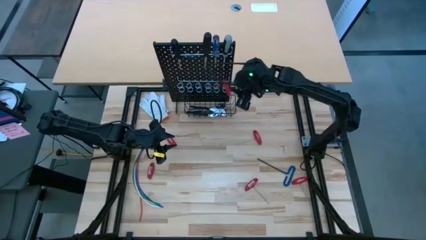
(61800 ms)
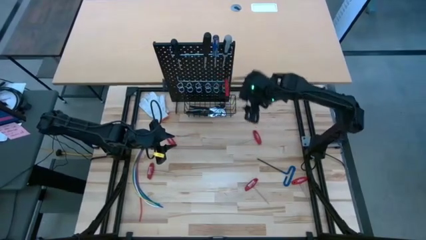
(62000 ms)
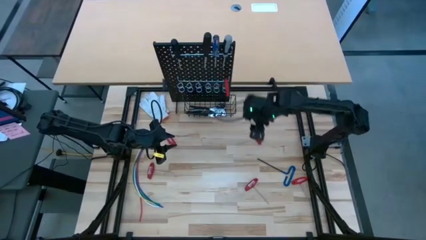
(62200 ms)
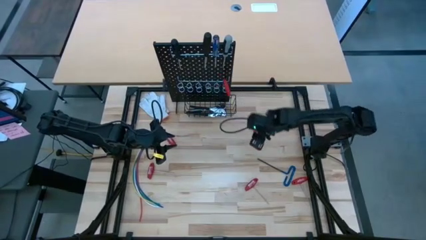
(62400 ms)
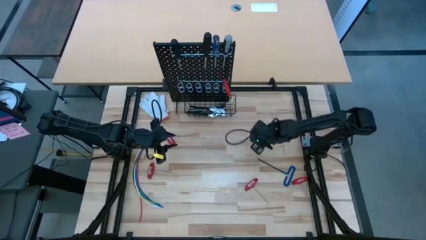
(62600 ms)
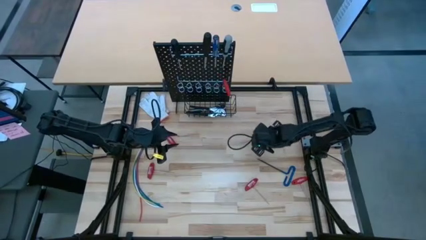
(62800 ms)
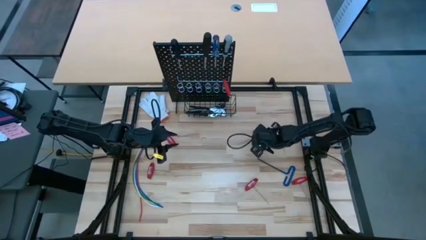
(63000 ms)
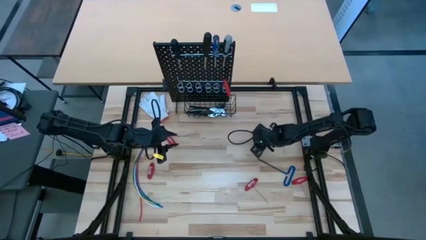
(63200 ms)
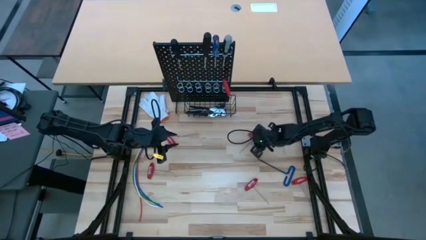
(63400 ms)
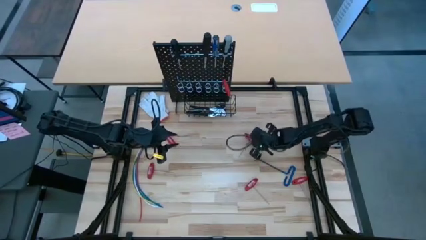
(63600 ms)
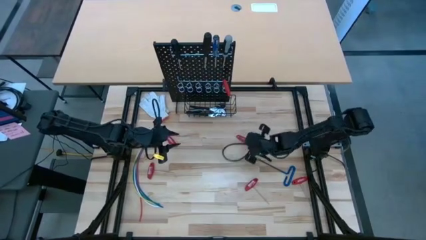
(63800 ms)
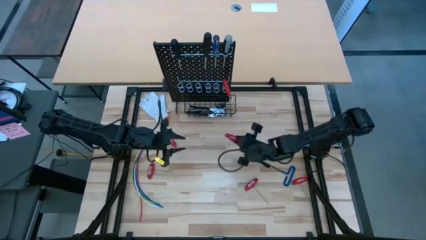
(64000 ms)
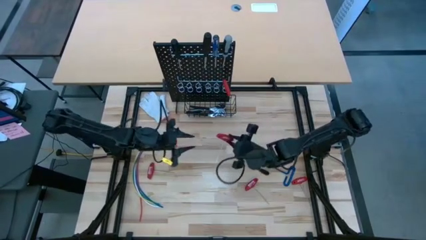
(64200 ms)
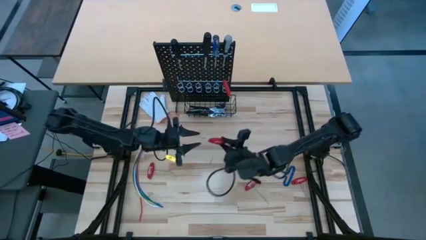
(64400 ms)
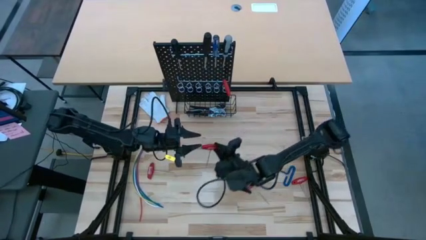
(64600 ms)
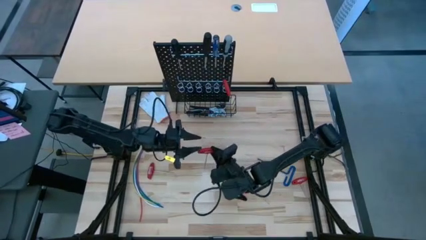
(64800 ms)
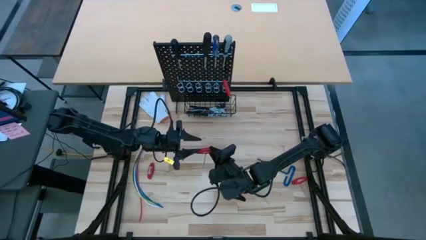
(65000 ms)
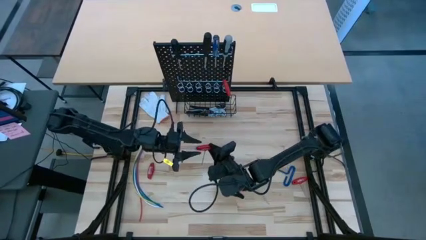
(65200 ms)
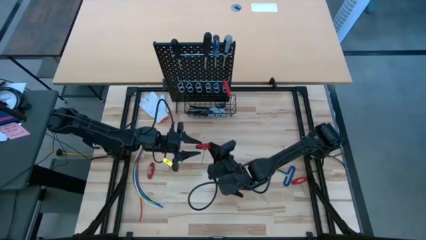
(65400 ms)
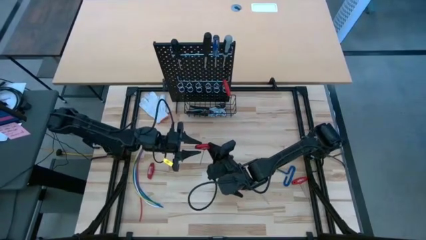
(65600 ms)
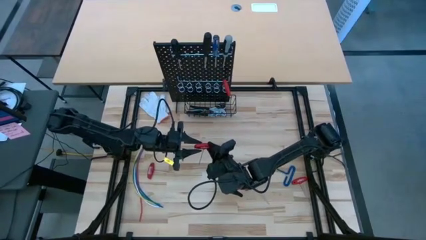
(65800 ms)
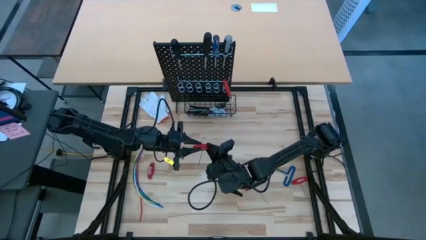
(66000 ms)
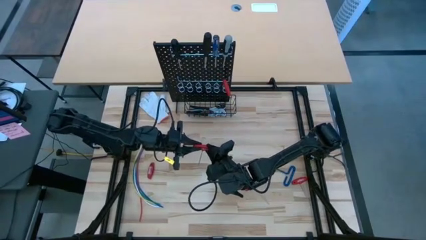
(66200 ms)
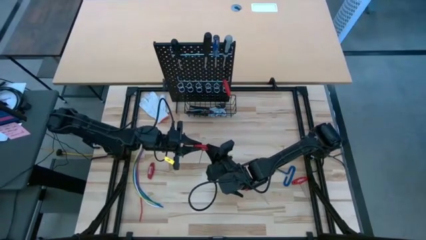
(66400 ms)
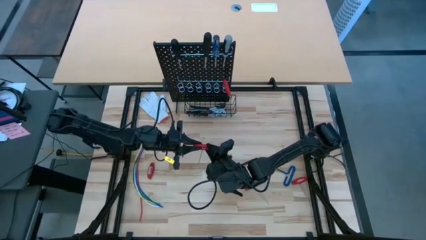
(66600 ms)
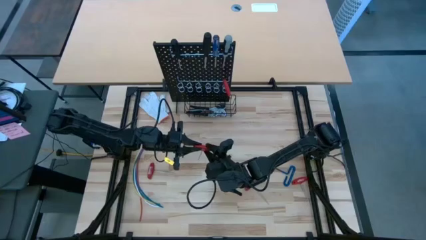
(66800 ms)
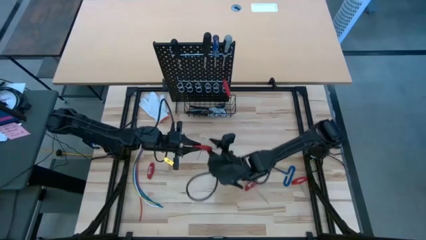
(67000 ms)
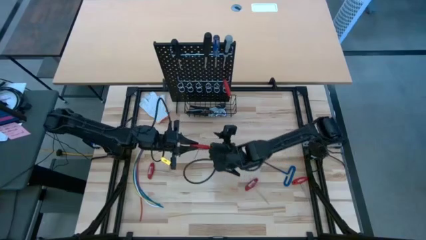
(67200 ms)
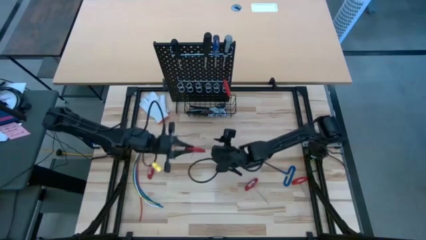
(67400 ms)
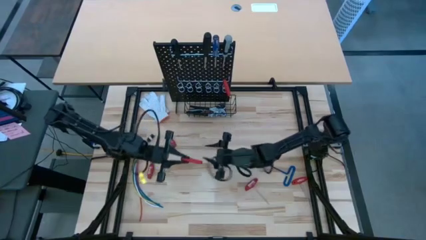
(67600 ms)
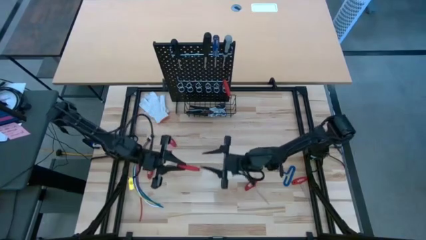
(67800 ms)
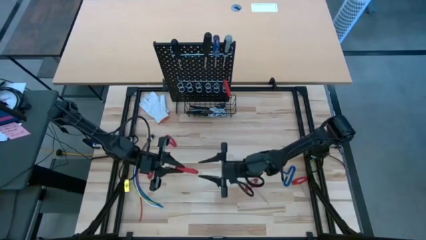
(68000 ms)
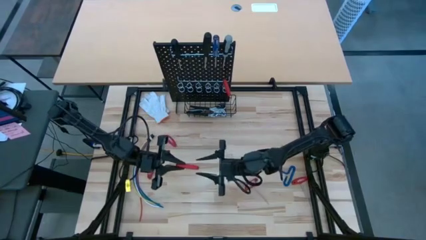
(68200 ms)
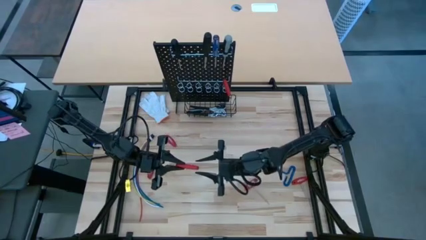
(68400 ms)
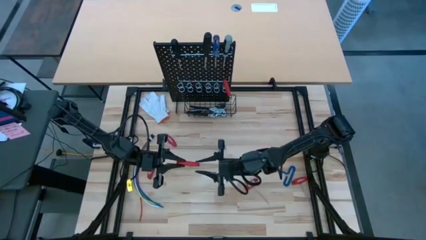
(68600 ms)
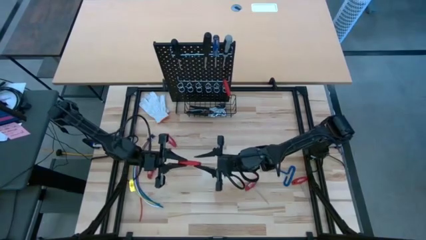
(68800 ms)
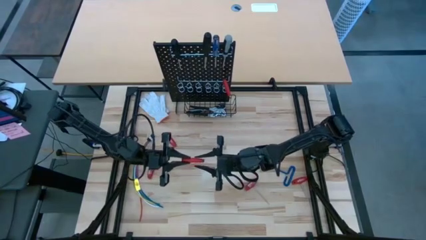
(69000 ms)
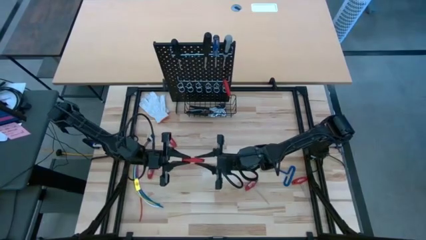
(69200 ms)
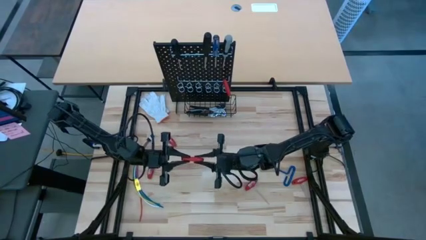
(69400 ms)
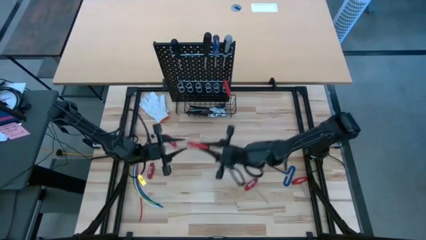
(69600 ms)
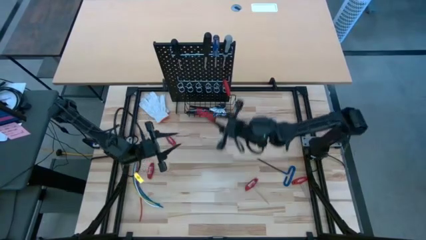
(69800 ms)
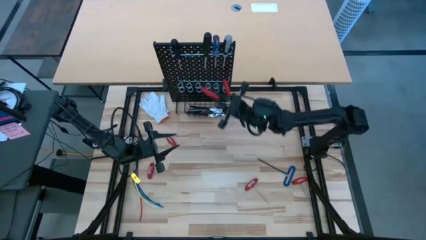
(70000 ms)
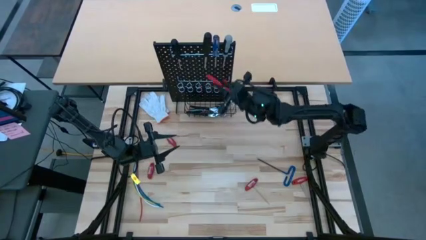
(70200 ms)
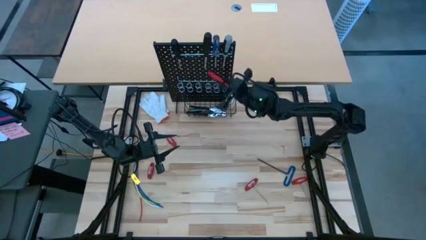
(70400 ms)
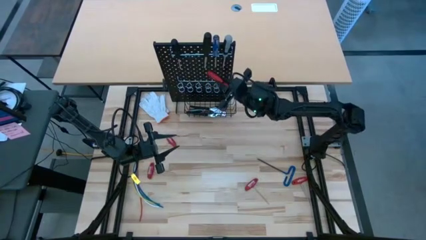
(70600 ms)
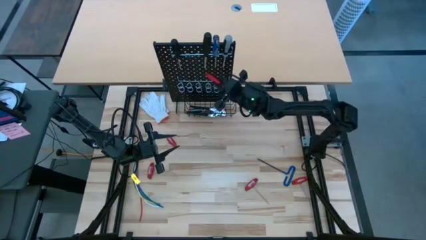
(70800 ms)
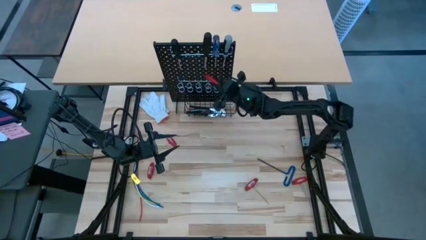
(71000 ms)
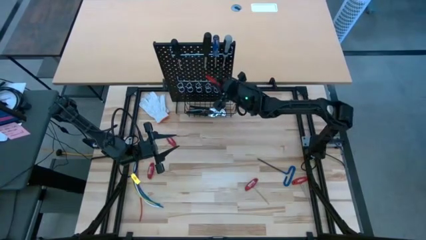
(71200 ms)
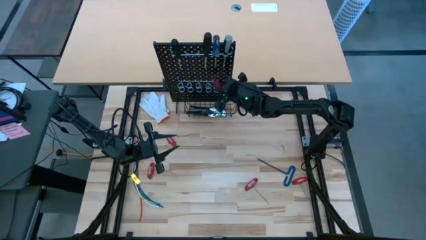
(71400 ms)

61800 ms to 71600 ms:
Task: Hang tools onto peg board
Hang the red allen wrench on the black pegboard

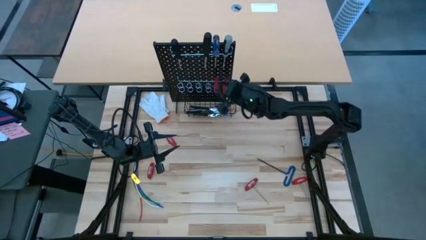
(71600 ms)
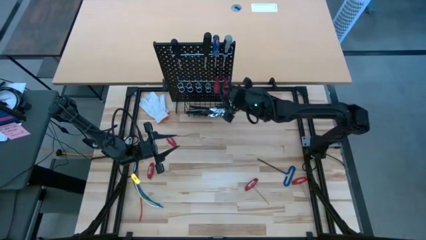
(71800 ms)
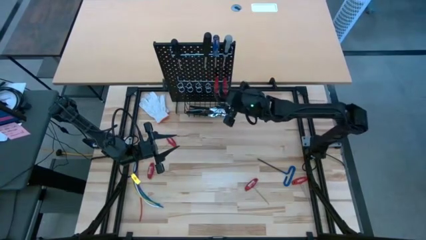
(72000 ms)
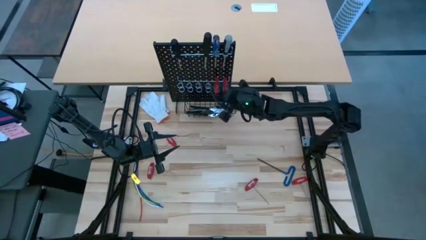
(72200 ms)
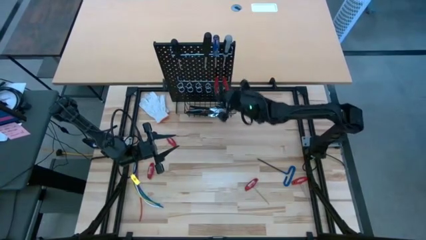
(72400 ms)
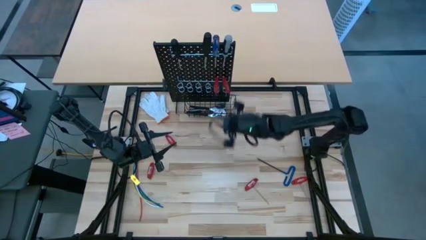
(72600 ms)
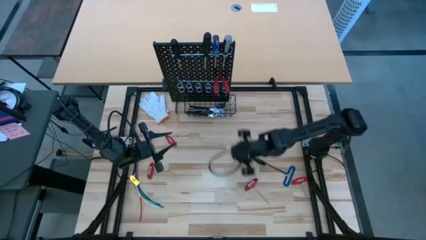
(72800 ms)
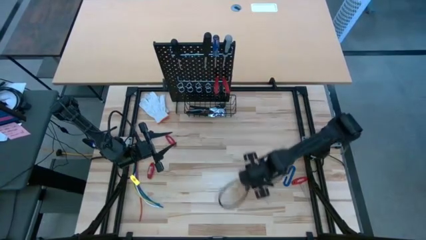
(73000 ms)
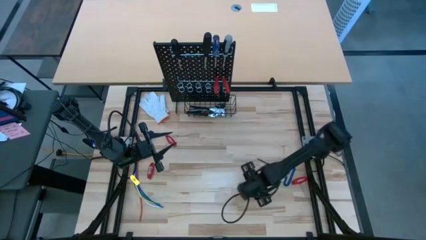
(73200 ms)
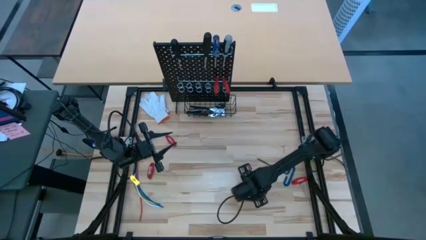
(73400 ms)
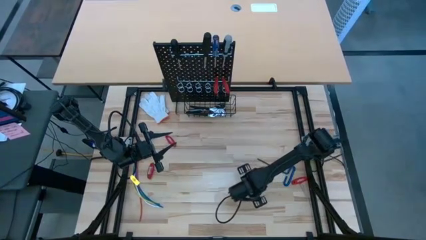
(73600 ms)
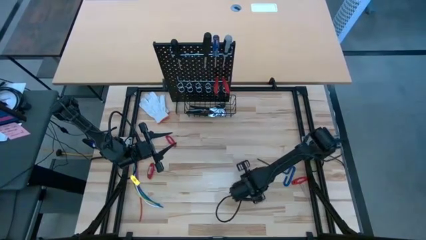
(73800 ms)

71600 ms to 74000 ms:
Hang the red allen wrench on the black pegboard

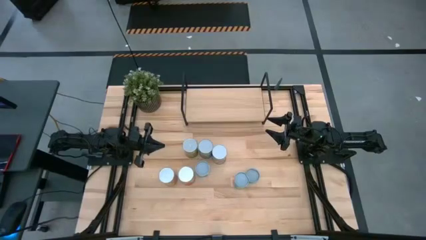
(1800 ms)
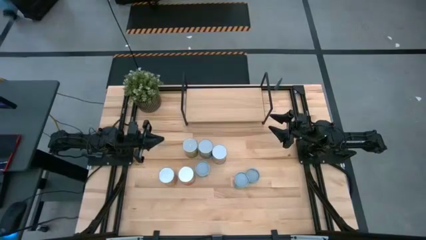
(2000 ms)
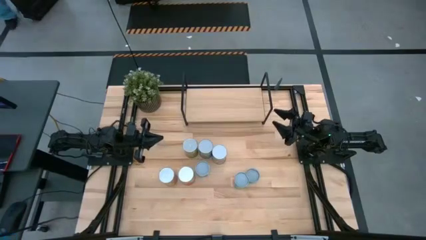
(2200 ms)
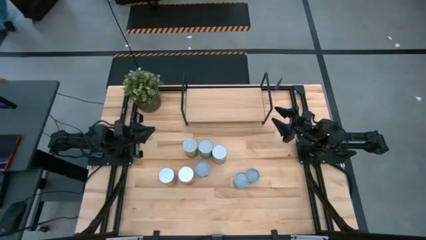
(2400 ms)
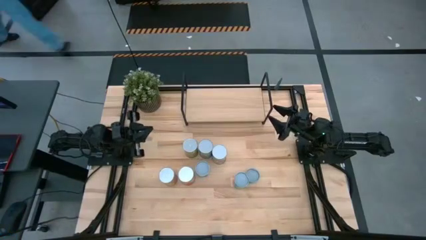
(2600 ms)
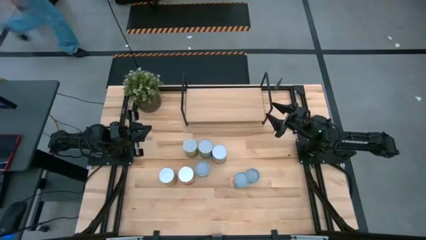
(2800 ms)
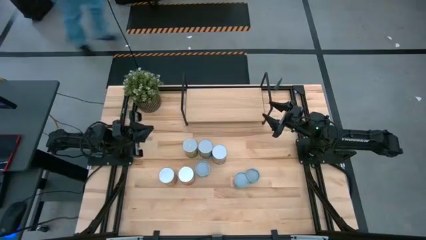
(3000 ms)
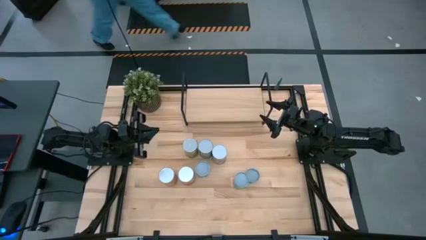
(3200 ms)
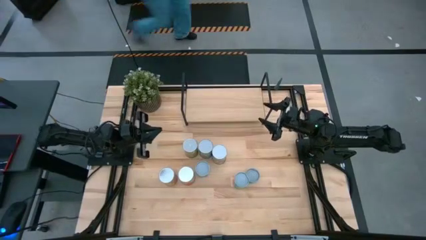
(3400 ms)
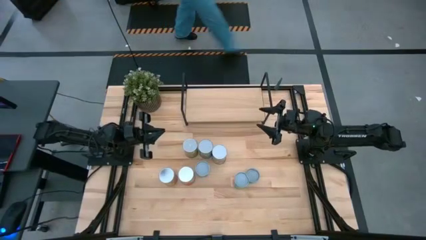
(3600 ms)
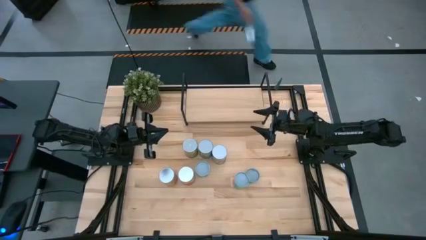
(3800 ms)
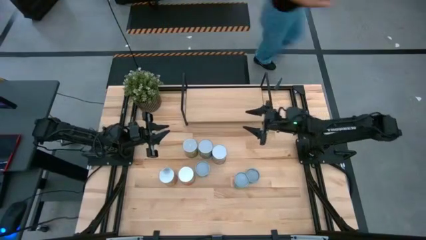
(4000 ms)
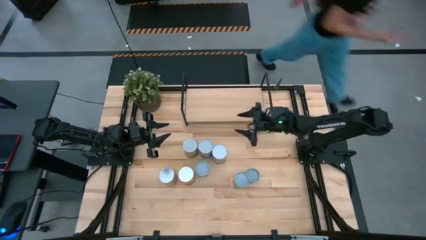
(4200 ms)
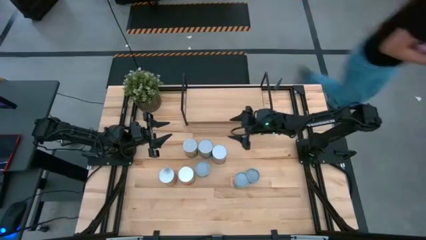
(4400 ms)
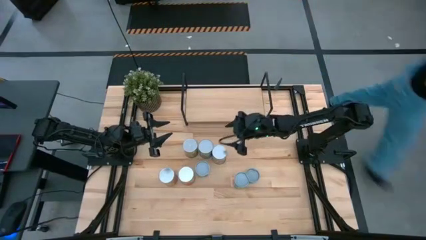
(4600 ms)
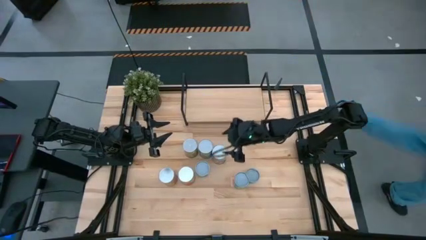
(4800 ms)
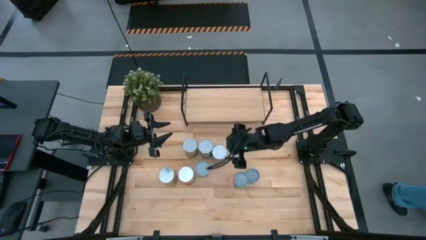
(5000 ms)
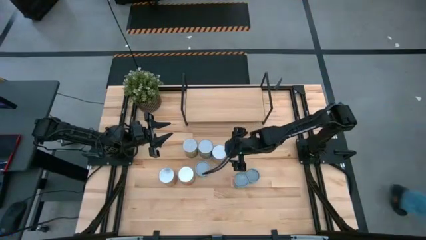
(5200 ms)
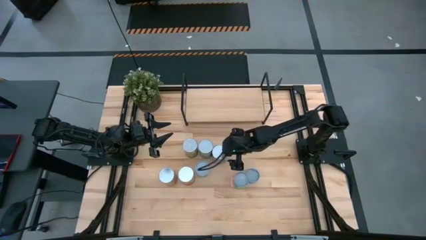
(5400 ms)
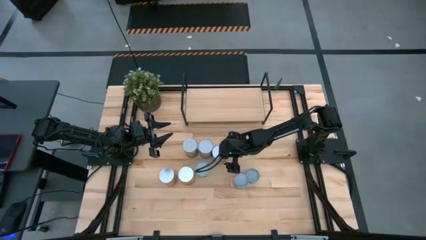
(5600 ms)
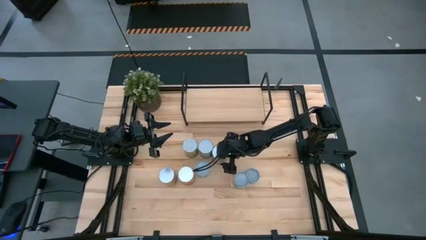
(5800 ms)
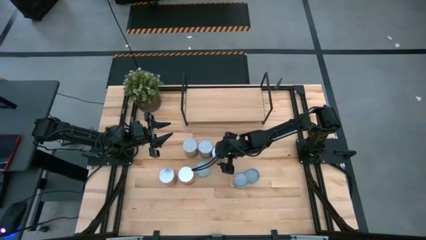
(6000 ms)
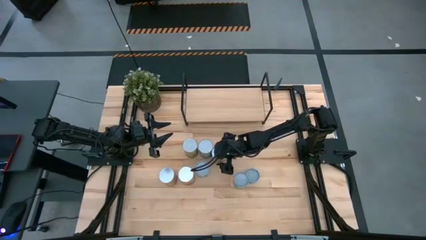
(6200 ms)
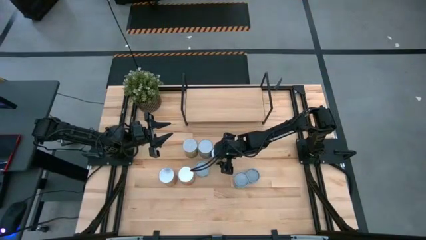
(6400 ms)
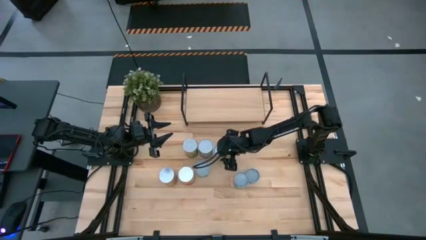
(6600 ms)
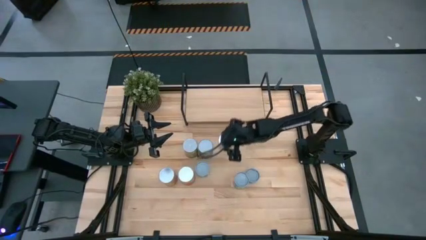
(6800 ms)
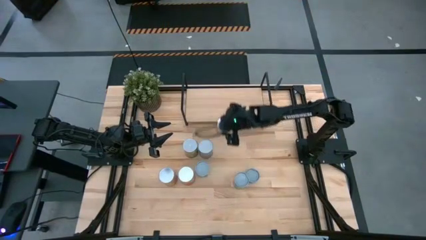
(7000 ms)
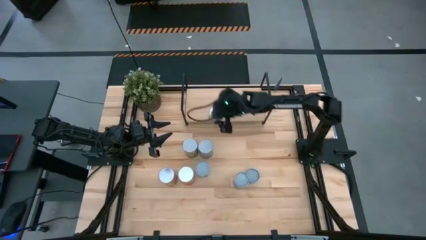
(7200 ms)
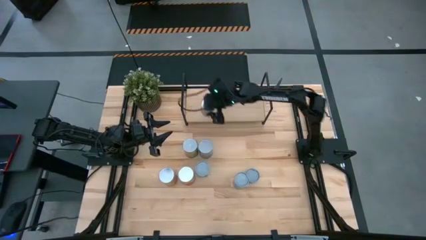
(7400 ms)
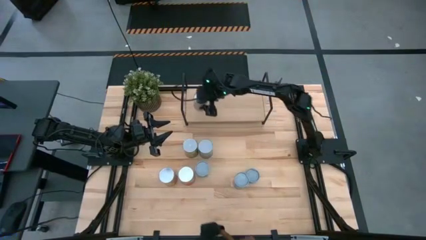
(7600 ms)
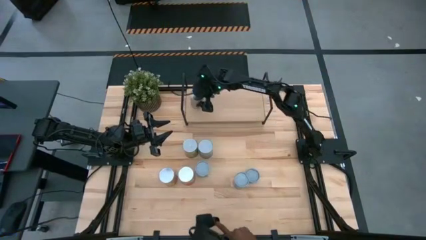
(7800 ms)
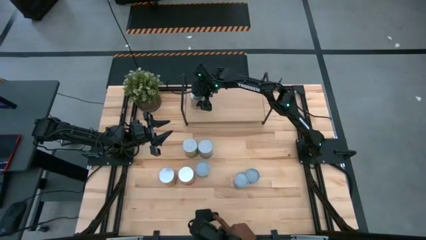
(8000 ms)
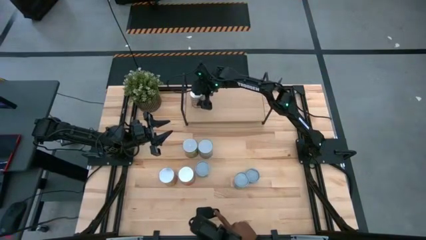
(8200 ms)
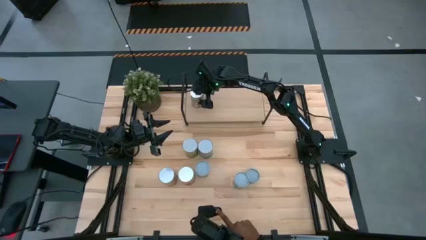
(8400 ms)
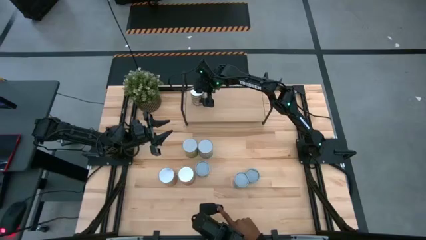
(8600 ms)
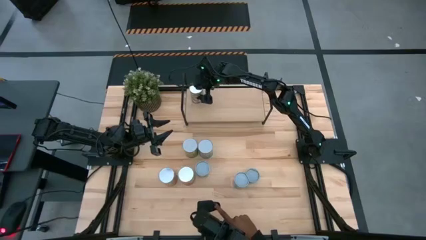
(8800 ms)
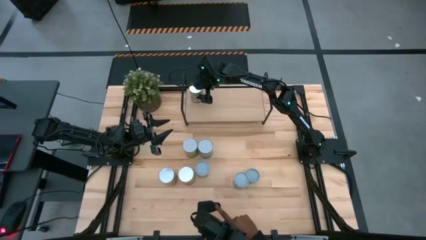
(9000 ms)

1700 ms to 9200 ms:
Task: Pick and place cans onto a shelf
Put the right blue can on the shelf
